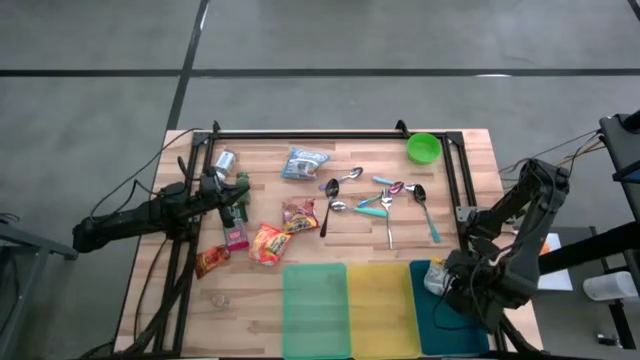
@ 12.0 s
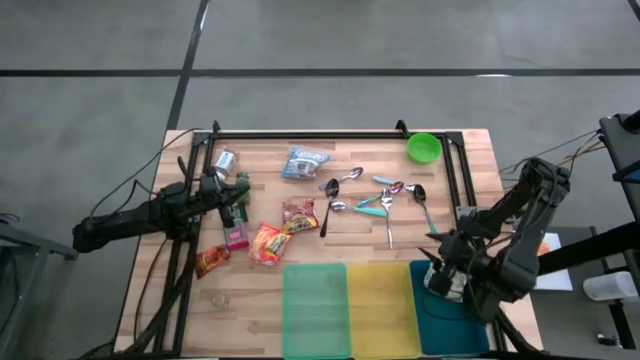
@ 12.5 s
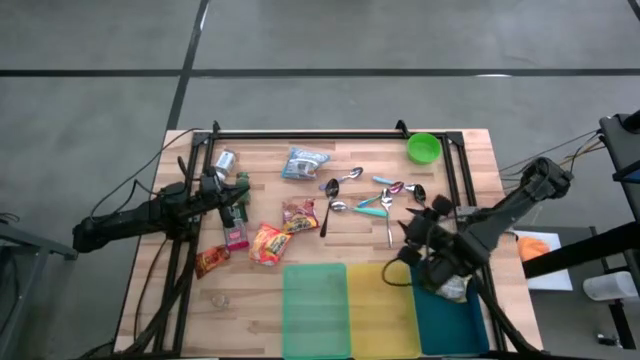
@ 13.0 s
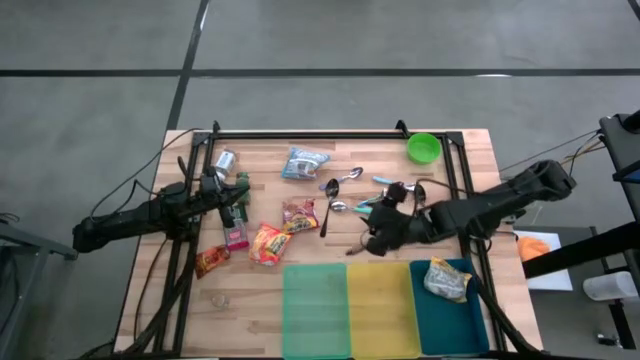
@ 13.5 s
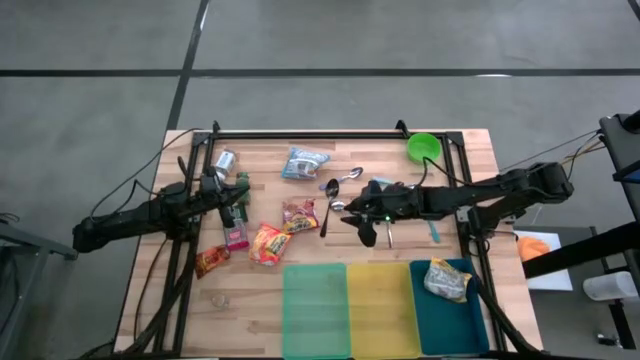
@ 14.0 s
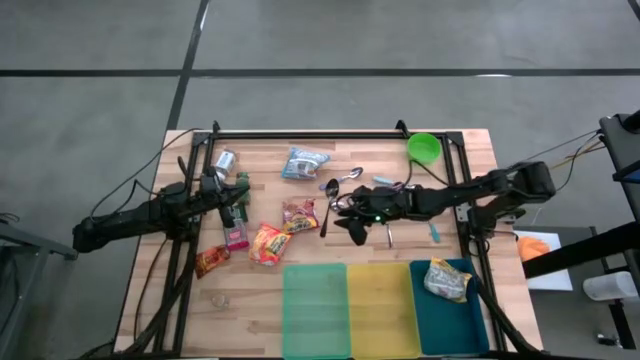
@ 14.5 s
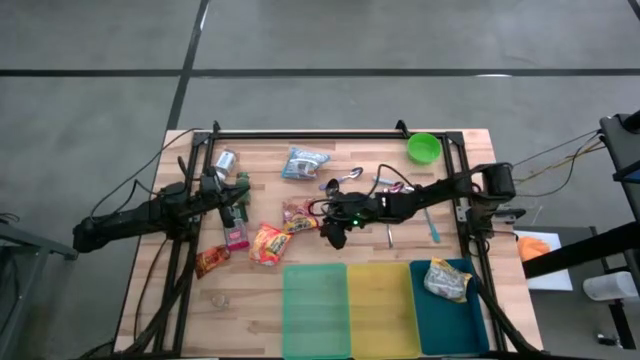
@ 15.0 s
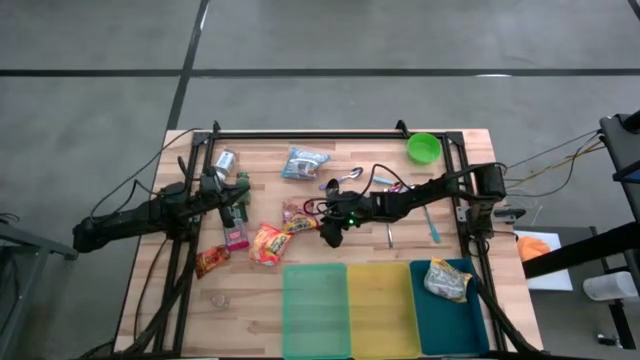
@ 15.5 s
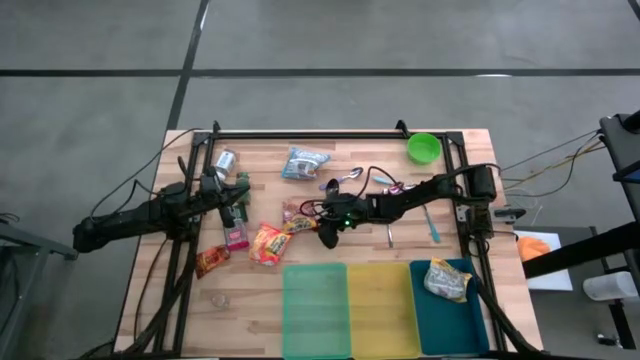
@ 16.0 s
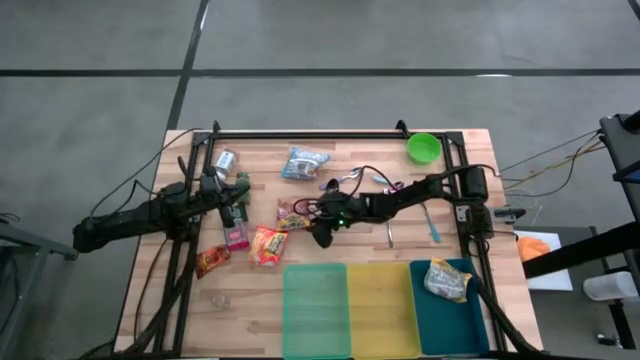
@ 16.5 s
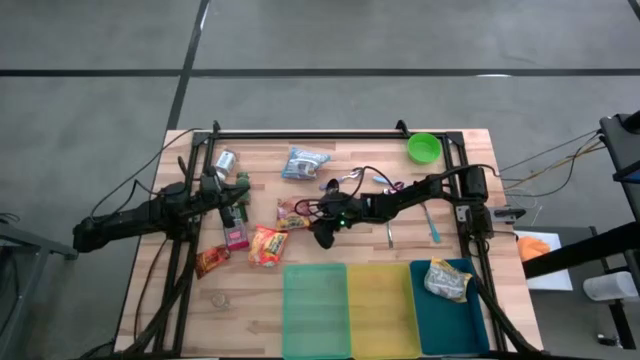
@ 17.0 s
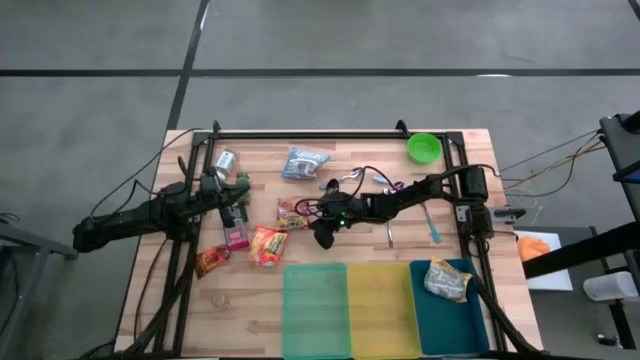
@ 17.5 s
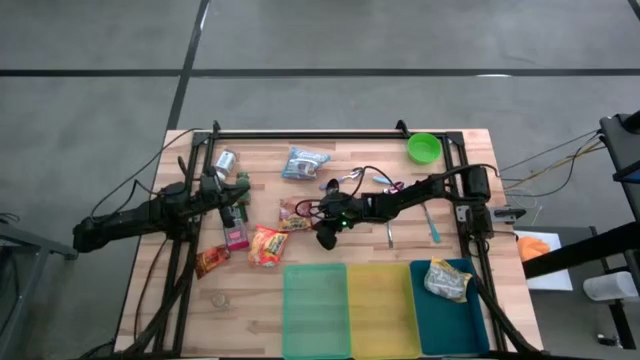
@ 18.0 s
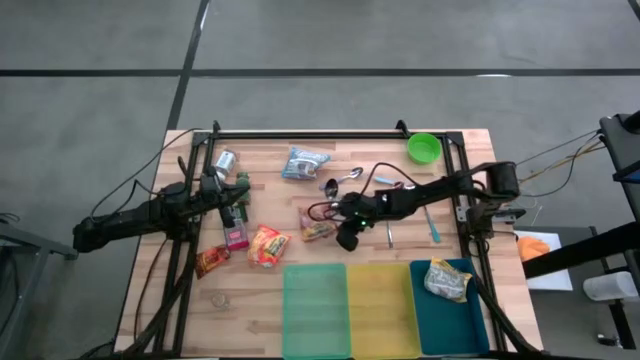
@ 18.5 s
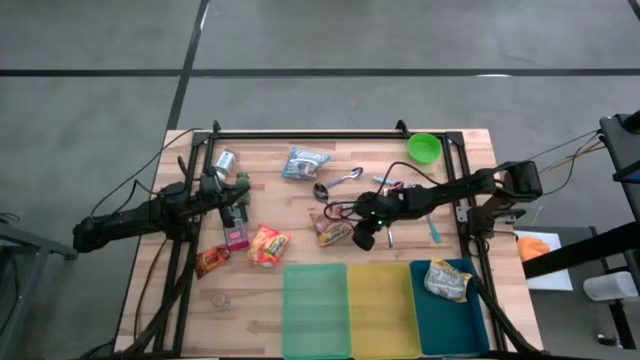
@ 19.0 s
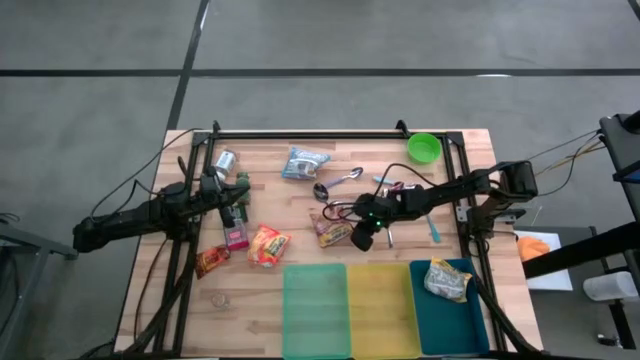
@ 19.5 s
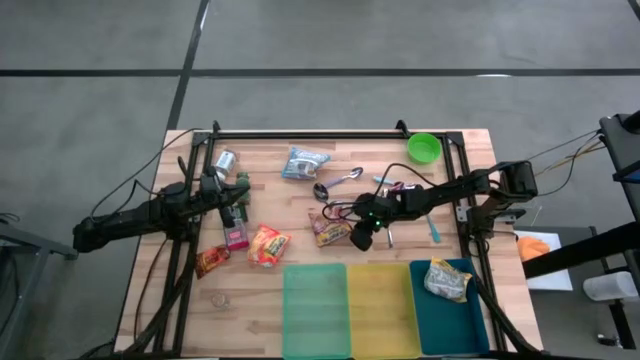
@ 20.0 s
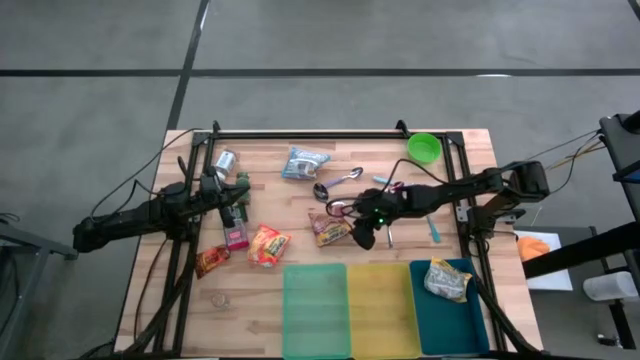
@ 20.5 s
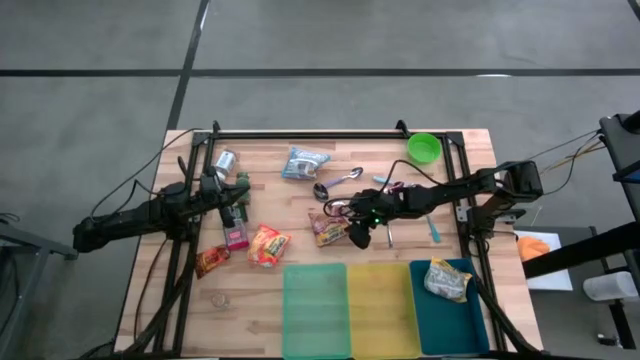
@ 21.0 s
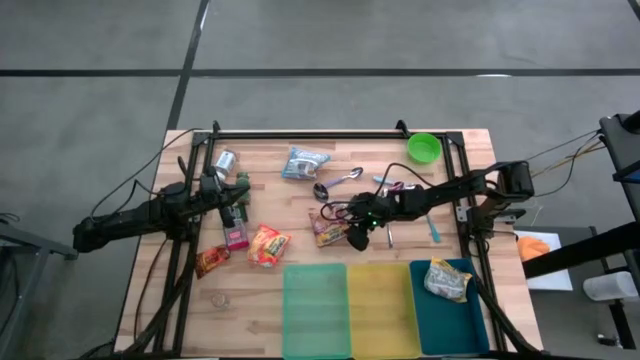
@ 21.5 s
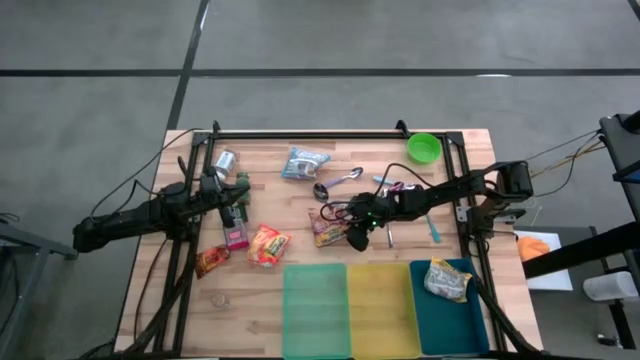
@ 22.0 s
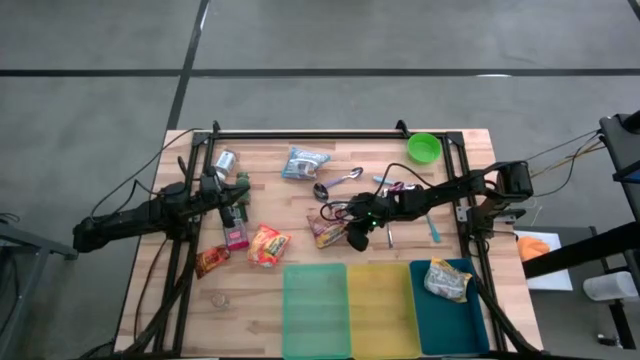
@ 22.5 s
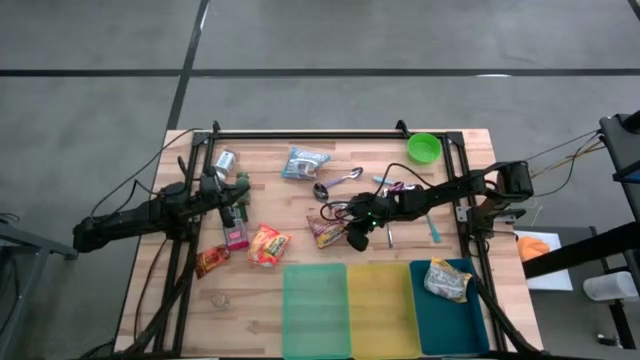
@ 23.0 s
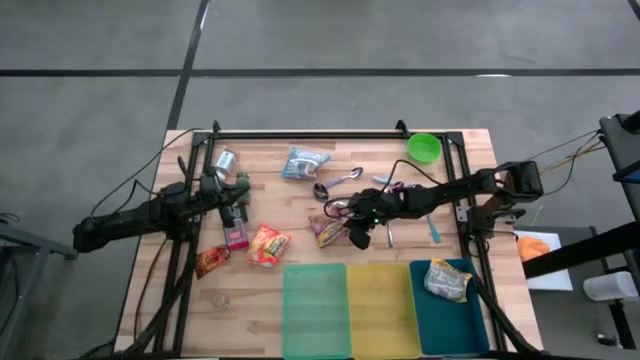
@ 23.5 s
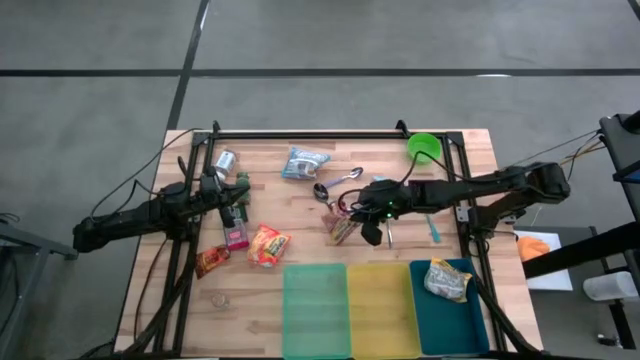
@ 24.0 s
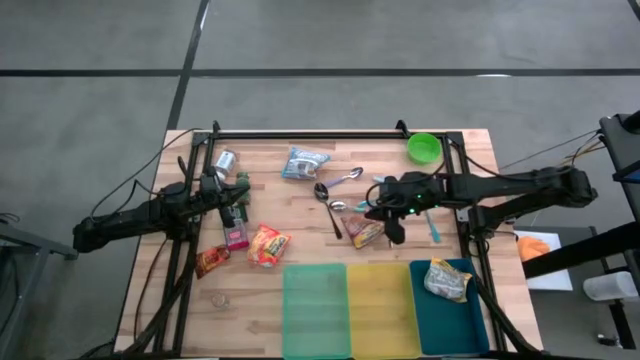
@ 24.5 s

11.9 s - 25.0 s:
Put the red noodle pack into the blue bin

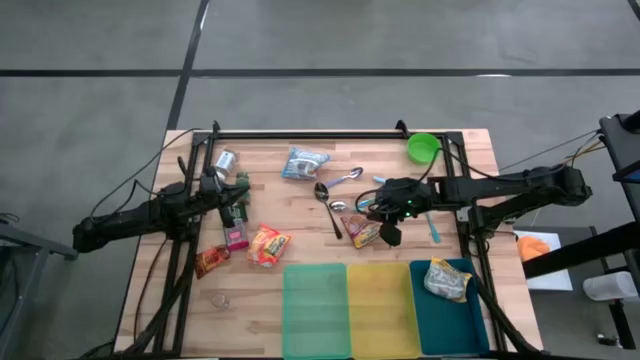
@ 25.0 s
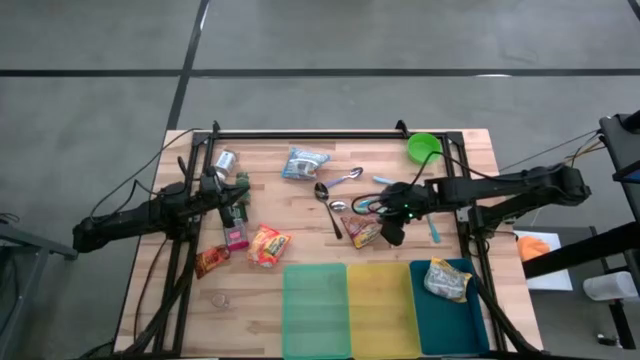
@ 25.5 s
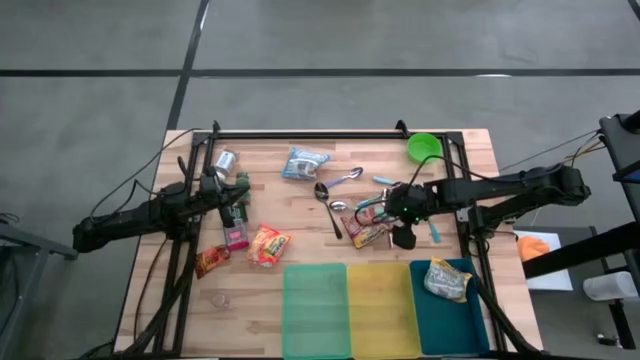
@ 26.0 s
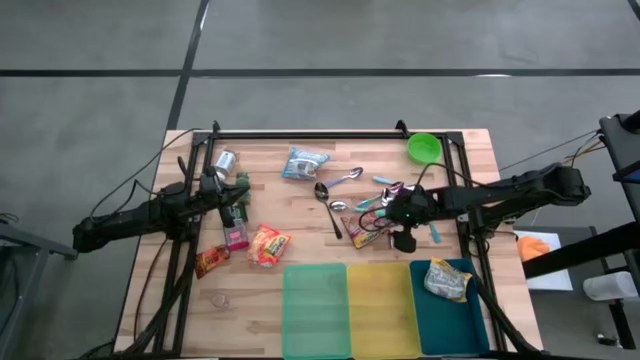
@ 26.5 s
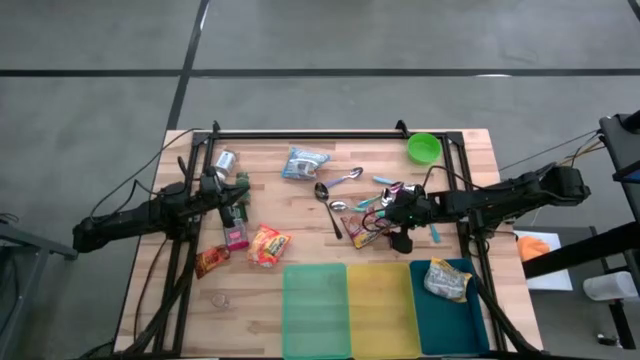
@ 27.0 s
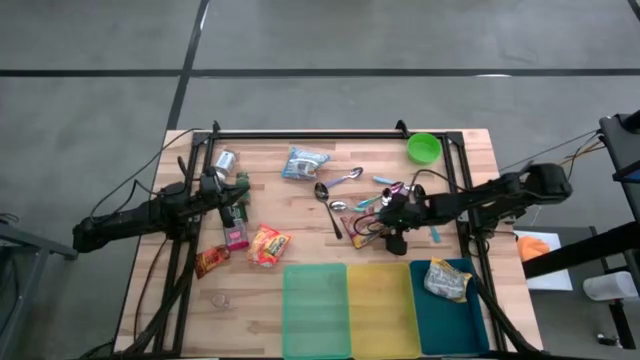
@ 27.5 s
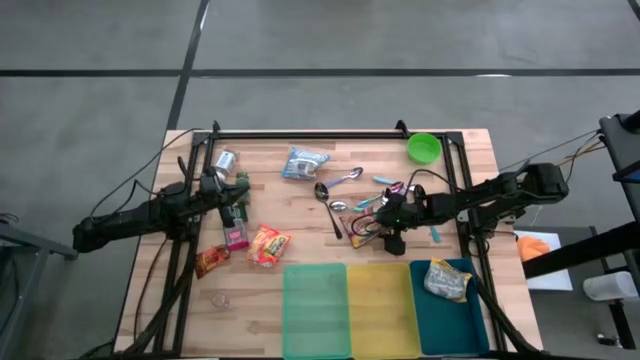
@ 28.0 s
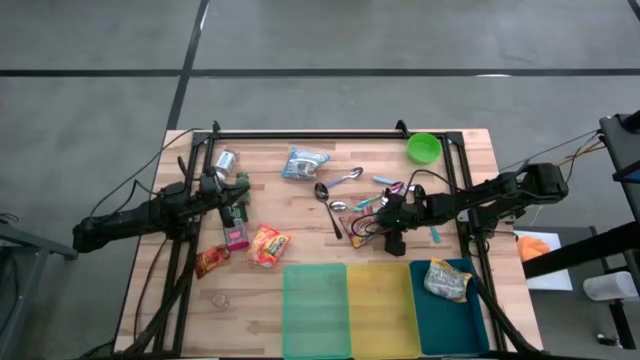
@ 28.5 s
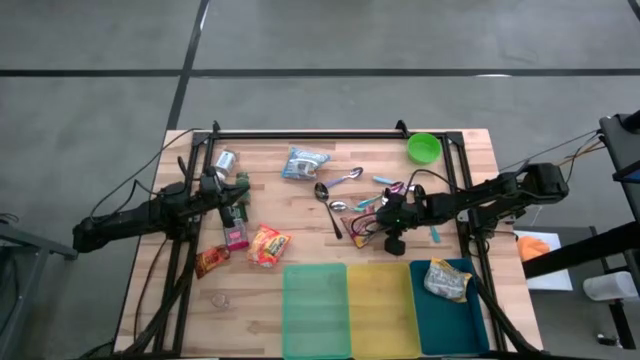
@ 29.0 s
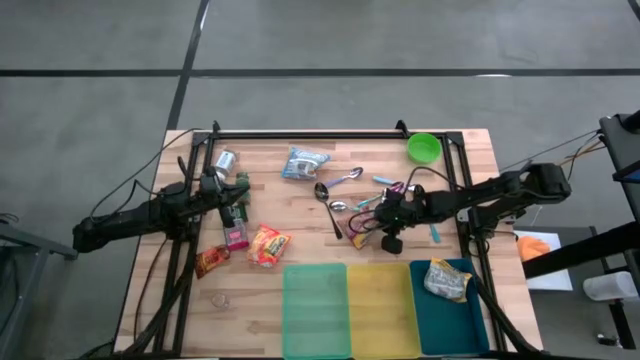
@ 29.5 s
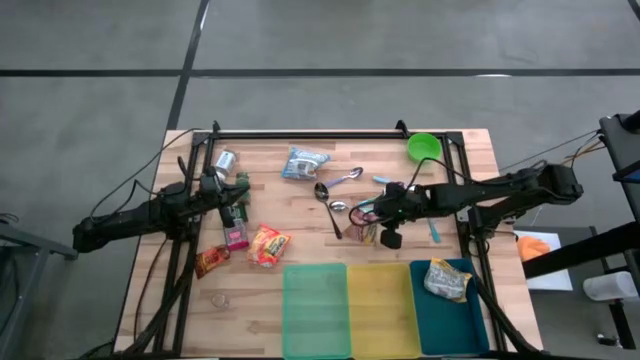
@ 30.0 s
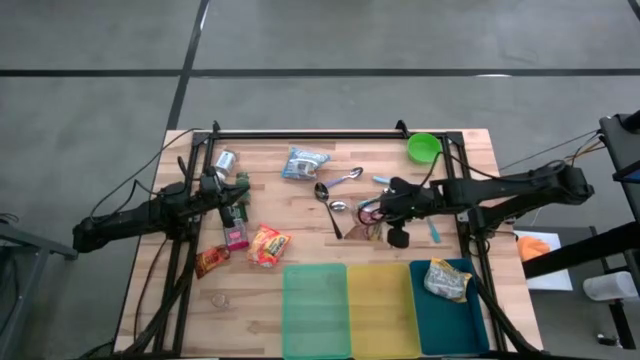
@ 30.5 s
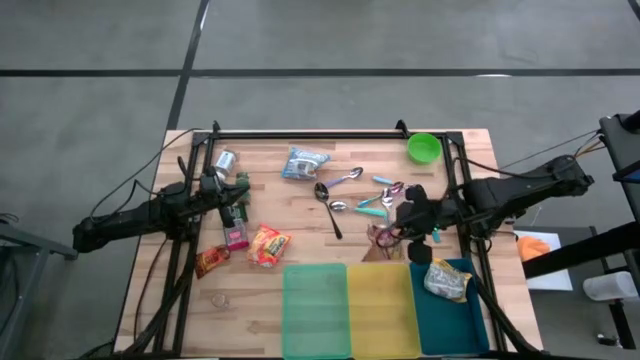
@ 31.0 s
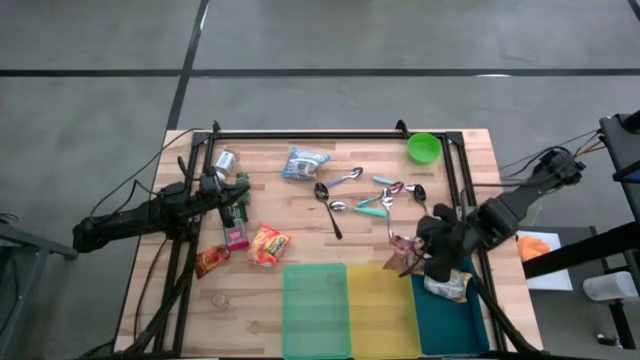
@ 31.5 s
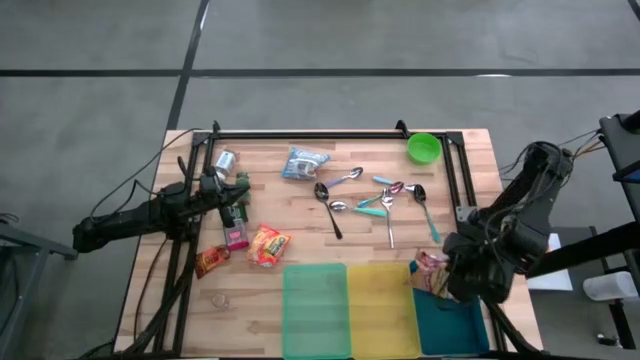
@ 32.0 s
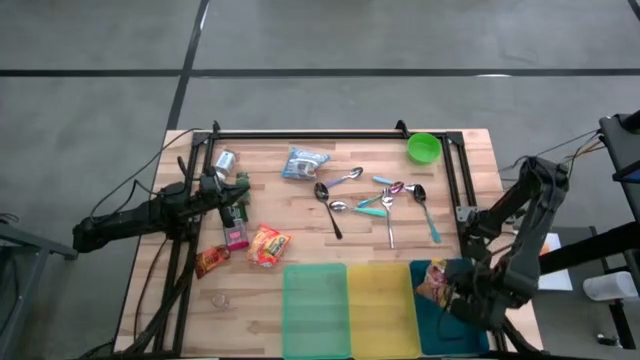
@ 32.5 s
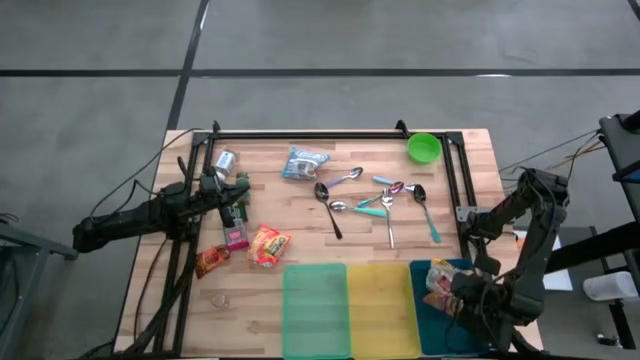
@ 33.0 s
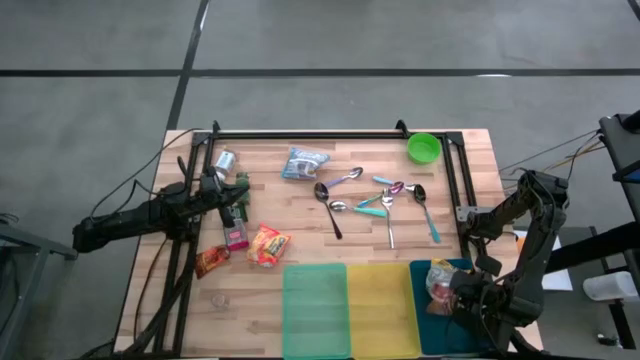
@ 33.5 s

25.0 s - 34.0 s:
Put the red noodle pack into the blue bin
